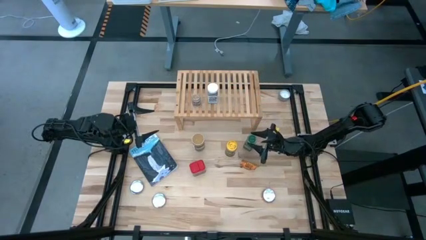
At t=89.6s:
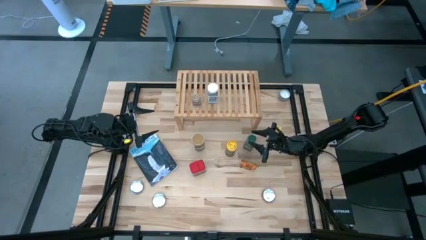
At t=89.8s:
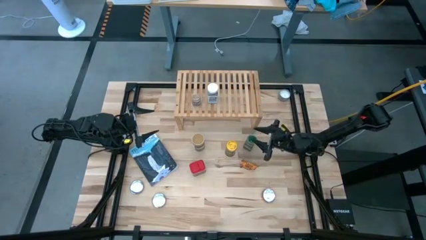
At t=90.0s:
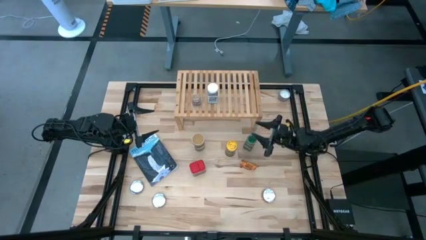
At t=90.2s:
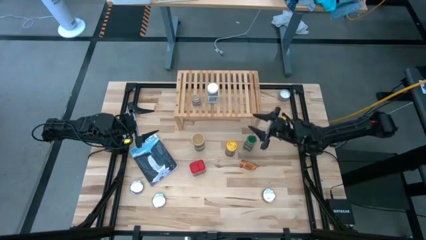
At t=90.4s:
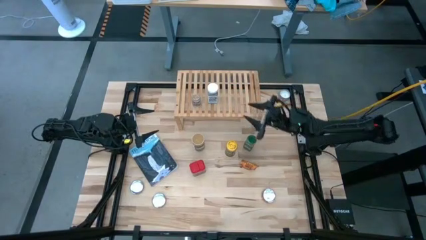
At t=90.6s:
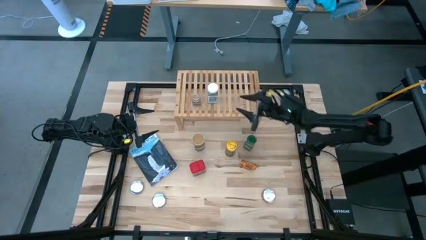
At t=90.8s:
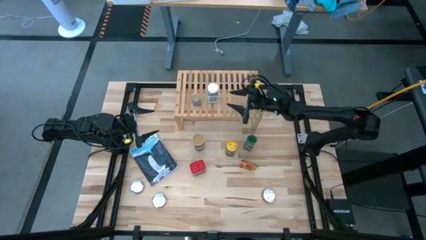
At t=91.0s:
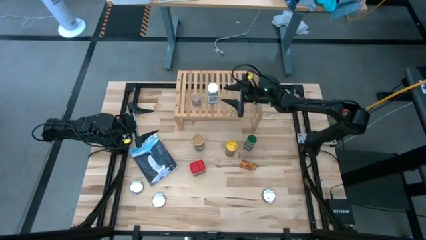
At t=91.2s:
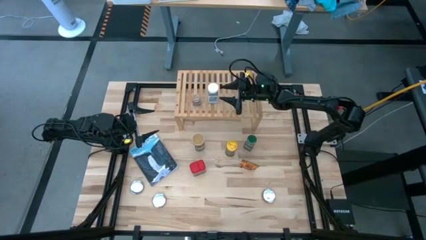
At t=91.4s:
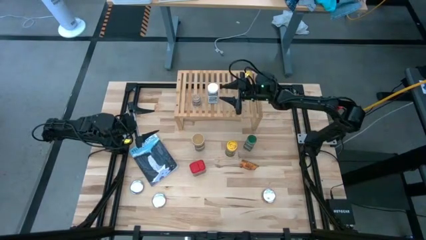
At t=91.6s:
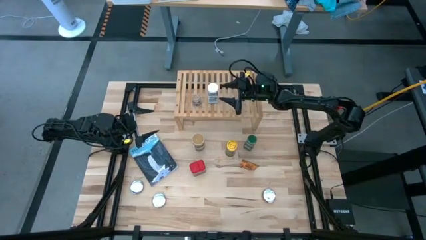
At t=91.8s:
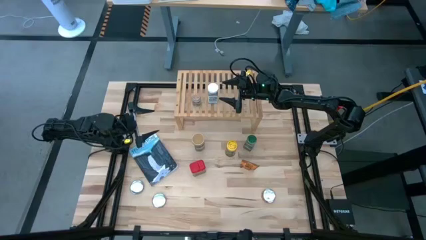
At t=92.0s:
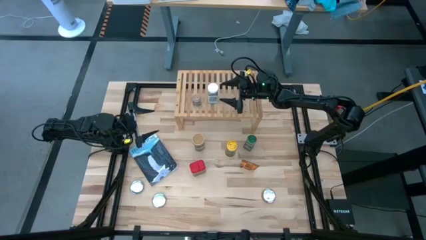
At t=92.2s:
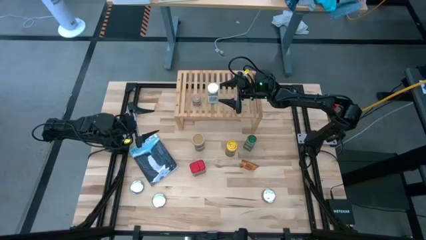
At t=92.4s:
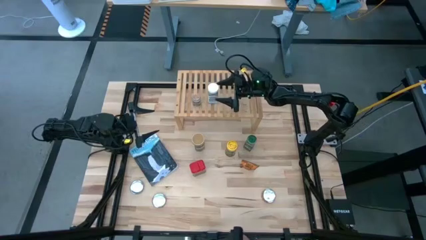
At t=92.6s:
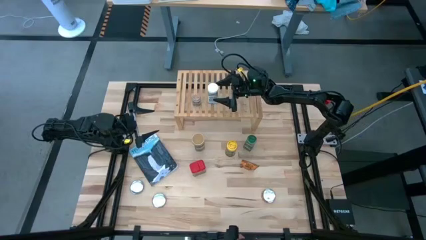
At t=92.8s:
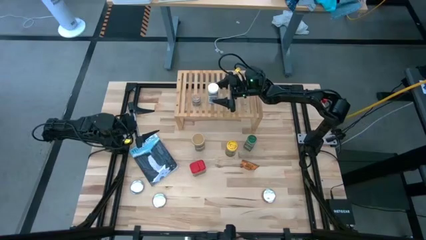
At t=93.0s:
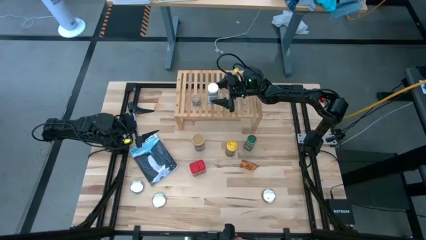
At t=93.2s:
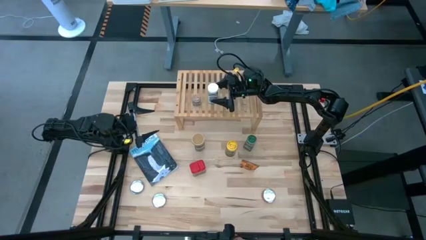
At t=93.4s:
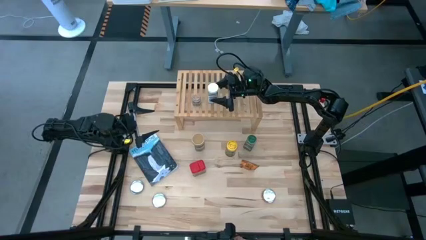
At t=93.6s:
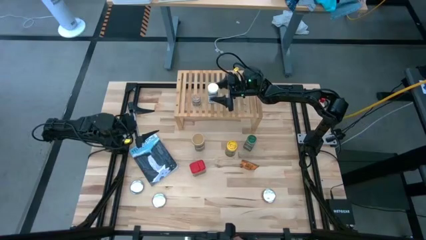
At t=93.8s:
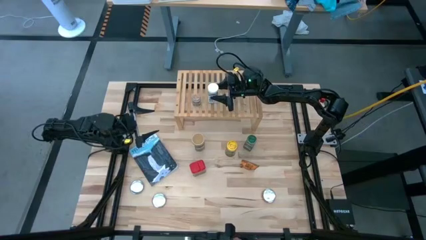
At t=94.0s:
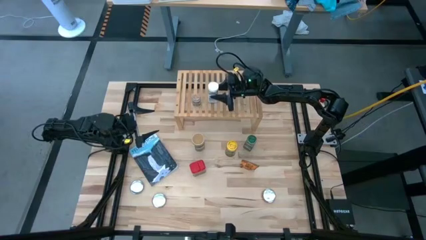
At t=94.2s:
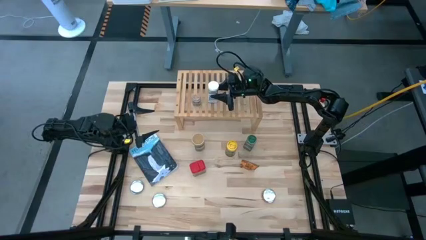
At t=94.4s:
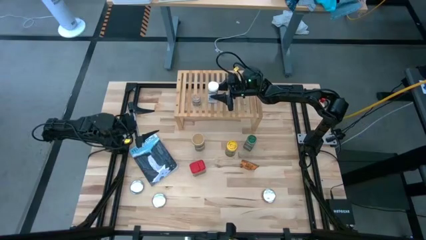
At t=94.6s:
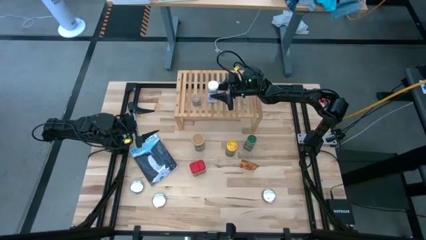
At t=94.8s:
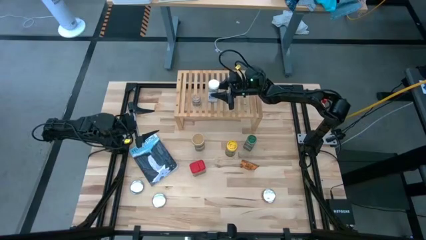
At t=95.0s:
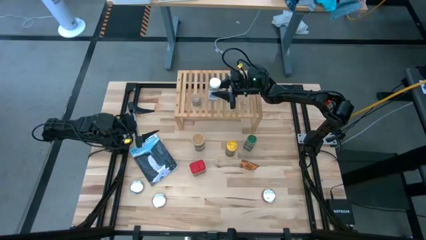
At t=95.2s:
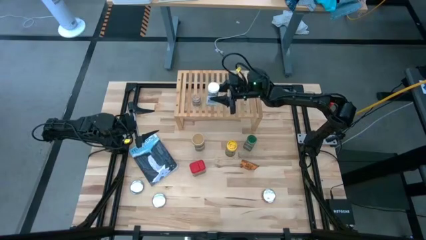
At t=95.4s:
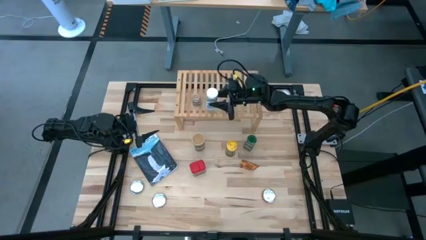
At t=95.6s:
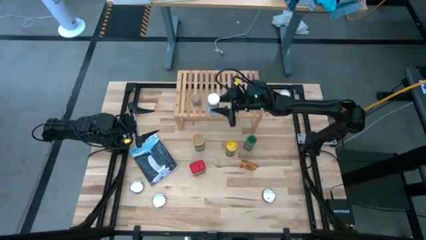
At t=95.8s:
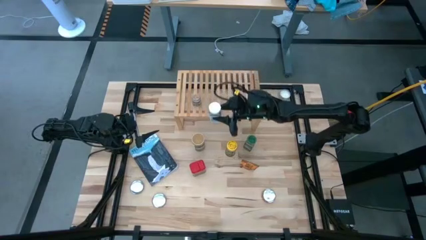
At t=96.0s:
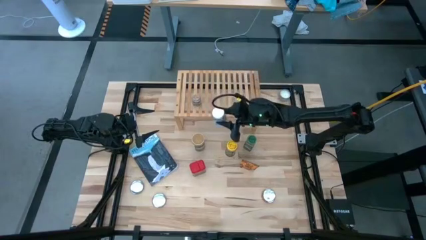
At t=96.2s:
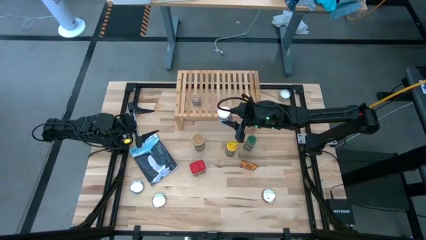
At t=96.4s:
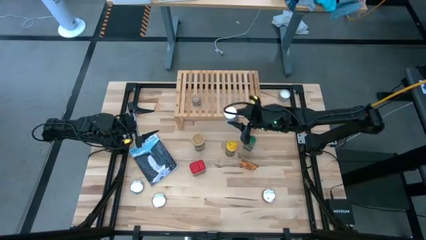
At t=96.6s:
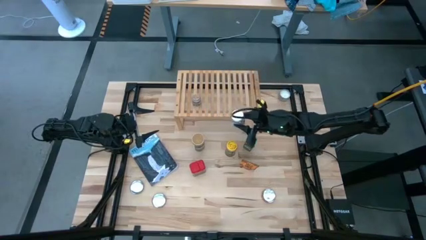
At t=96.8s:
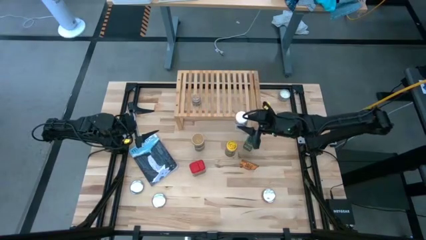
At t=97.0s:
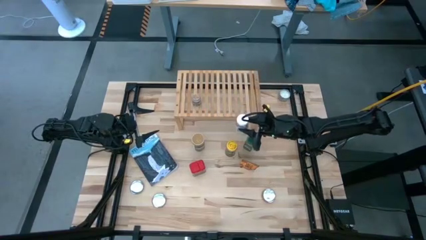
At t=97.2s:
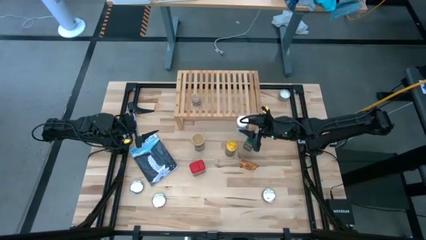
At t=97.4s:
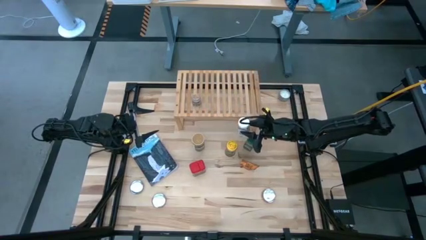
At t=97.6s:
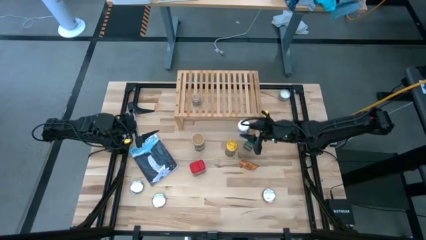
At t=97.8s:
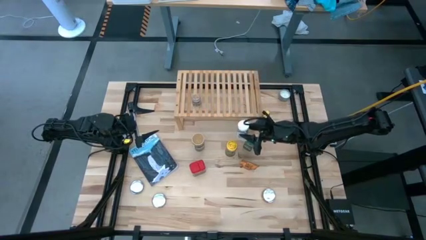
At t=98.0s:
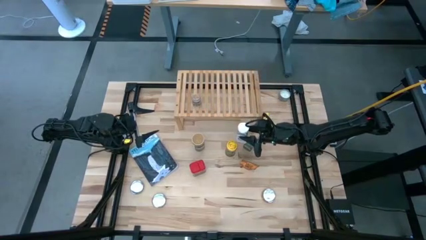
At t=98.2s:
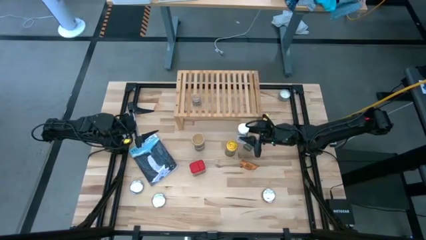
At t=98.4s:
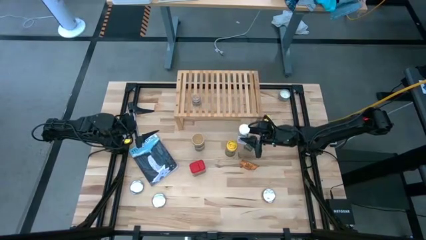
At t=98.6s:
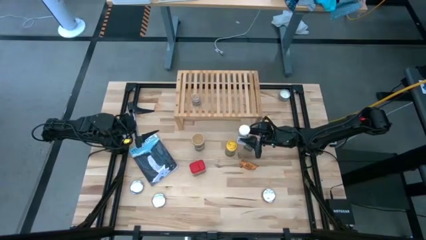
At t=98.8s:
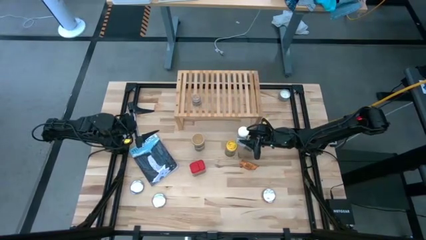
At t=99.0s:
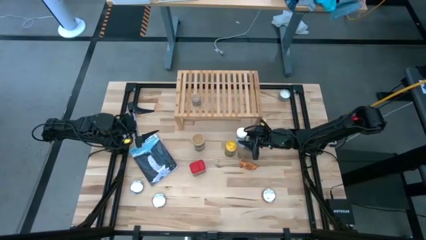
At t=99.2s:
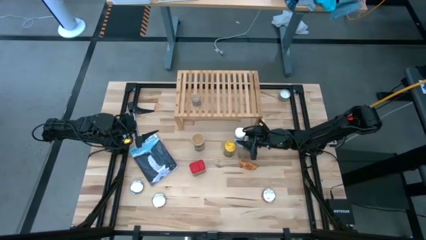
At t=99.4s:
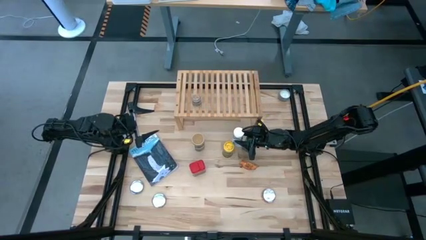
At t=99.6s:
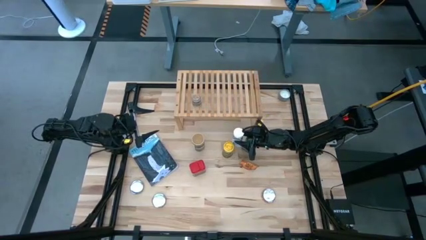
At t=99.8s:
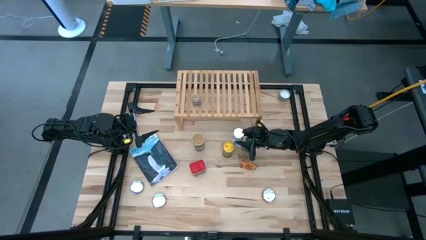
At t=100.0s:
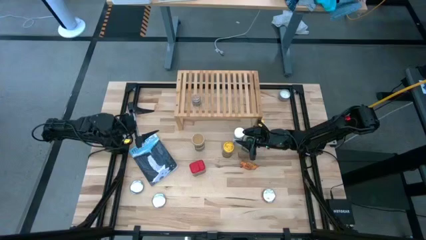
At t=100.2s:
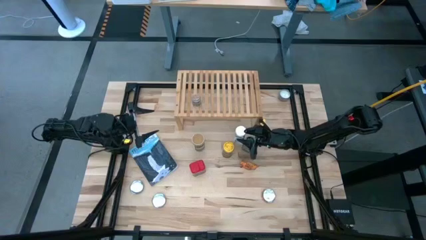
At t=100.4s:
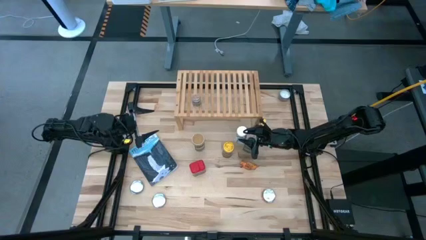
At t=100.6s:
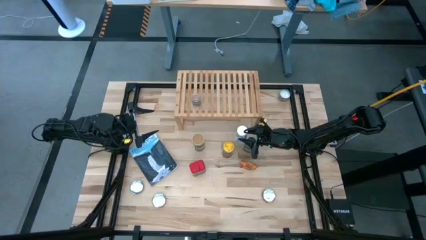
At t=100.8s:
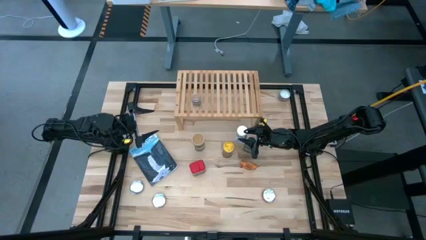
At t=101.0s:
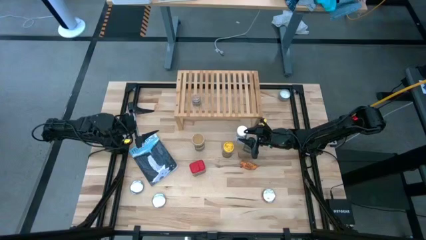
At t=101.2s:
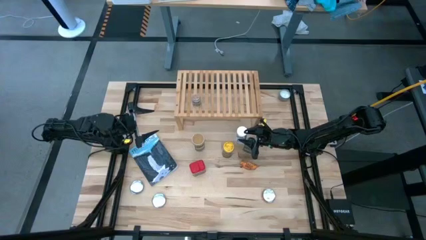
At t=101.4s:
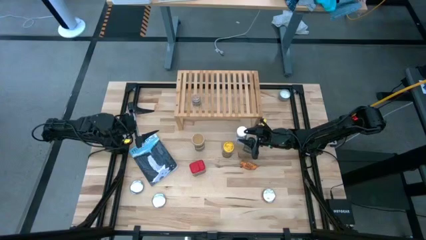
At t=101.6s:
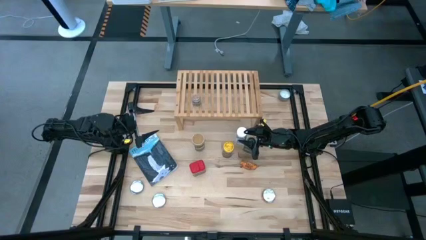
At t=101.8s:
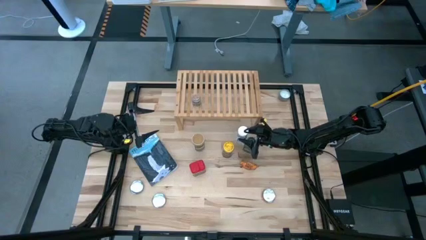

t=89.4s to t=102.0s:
Task: Shelf spices
Remove the white seasoning bottle from the shelf

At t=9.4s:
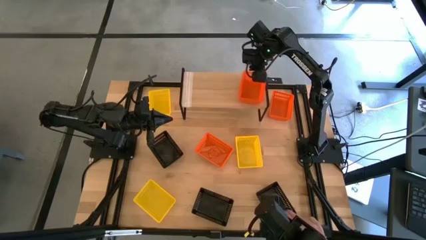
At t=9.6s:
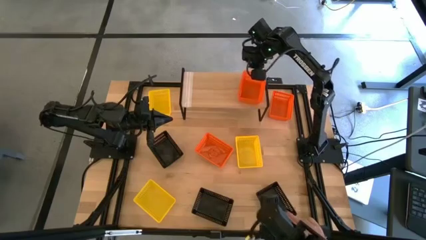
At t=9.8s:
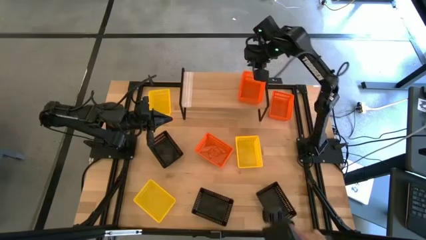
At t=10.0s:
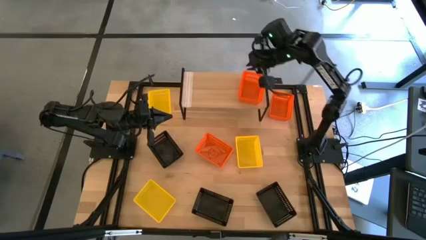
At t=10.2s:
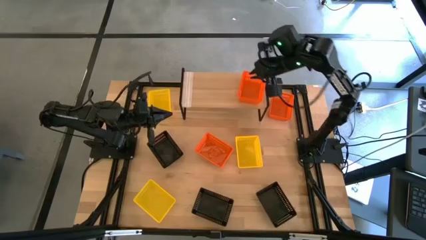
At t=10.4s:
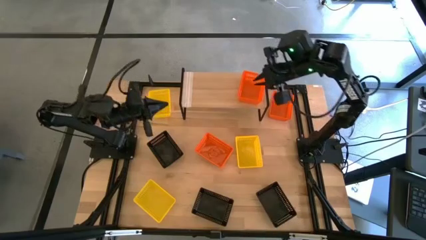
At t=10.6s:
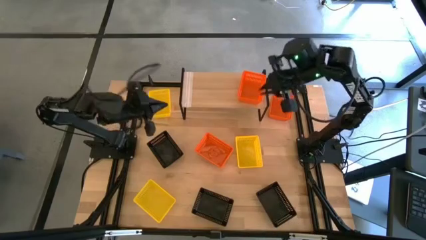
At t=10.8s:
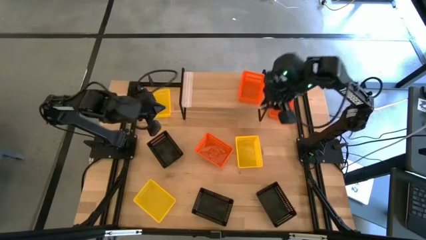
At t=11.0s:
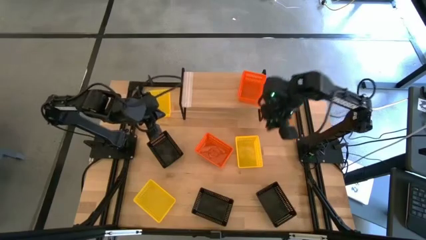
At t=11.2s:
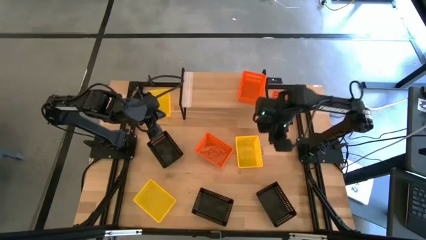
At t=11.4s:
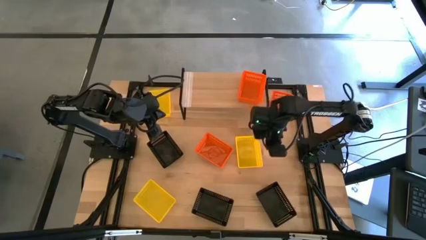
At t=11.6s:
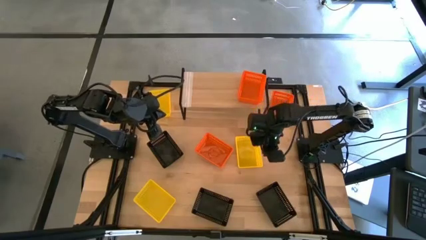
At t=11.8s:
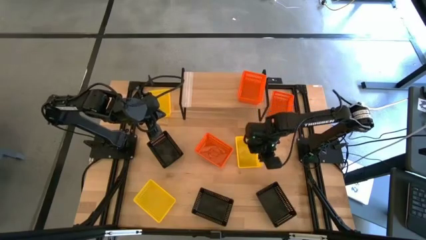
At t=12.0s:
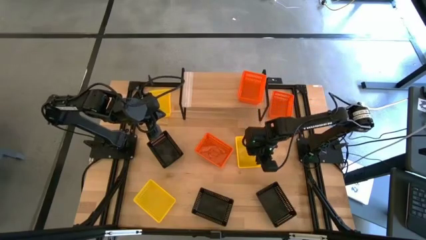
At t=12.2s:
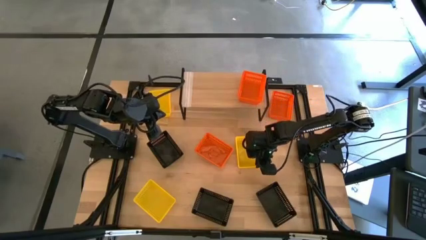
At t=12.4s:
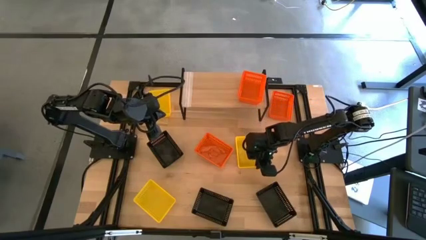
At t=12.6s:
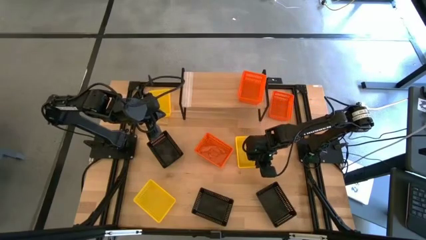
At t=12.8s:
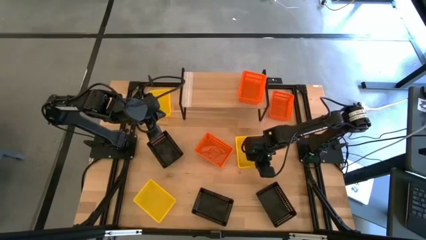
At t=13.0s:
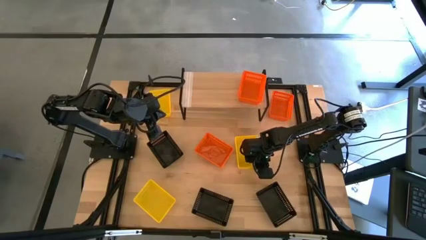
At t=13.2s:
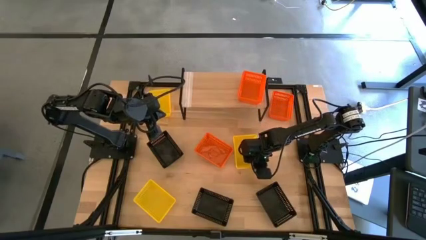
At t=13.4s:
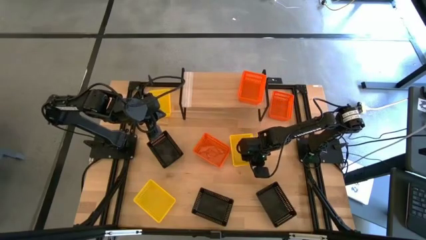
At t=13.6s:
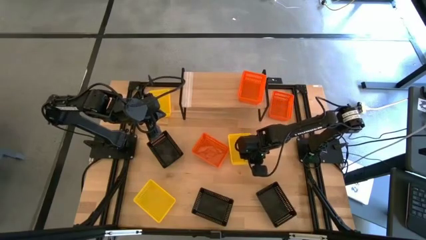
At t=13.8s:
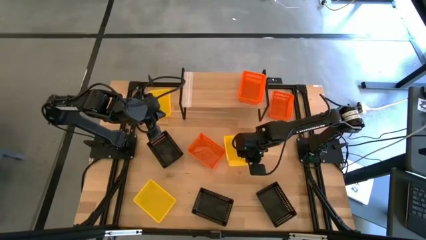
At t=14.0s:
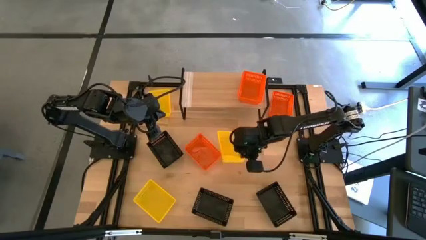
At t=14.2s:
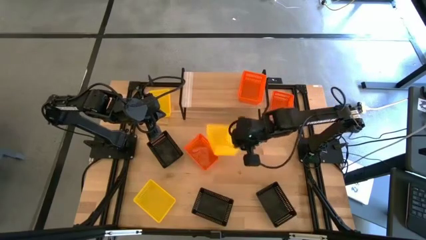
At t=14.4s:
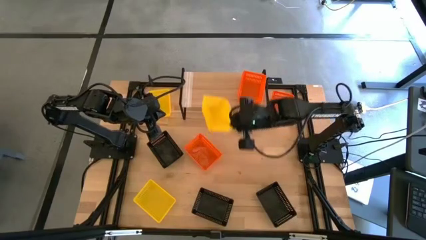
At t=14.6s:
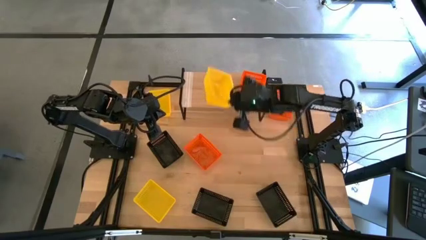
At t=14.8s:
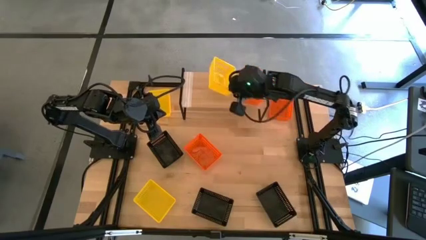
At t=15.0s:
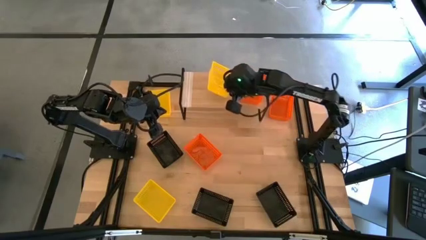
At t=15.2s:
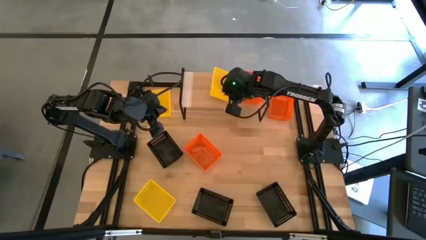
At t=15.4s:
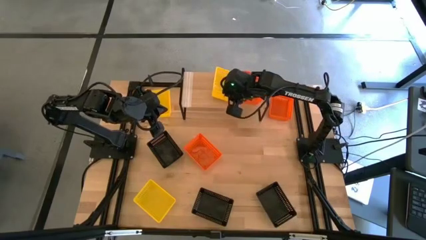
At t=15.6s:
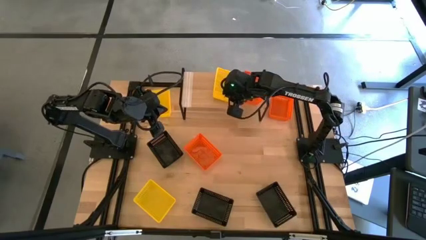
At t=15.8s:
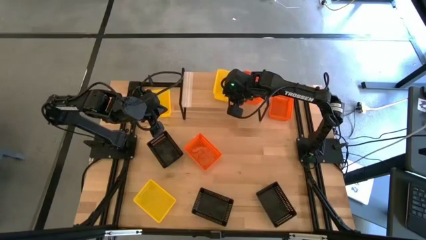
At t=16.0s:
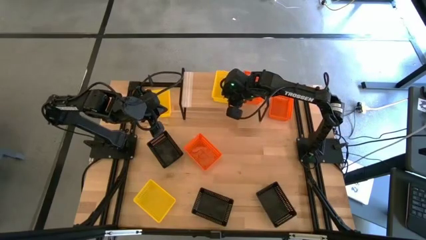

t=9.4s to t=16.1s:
Task: Stack baskets on shelf by color
Put the right yellow basket on the shelf
